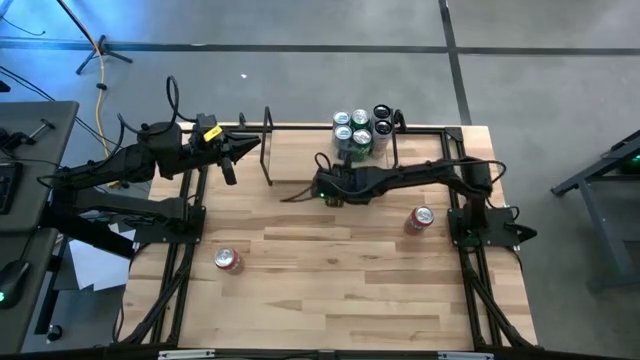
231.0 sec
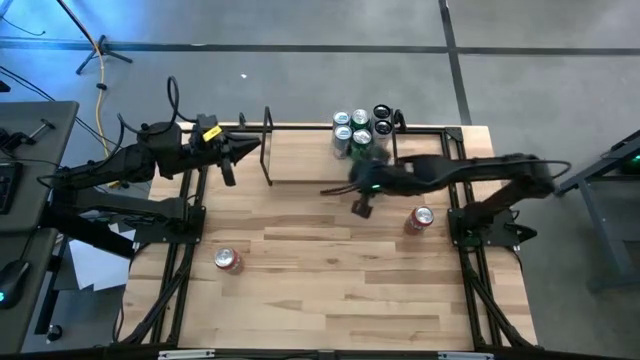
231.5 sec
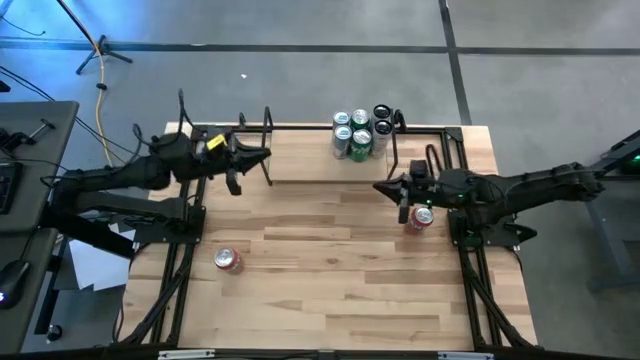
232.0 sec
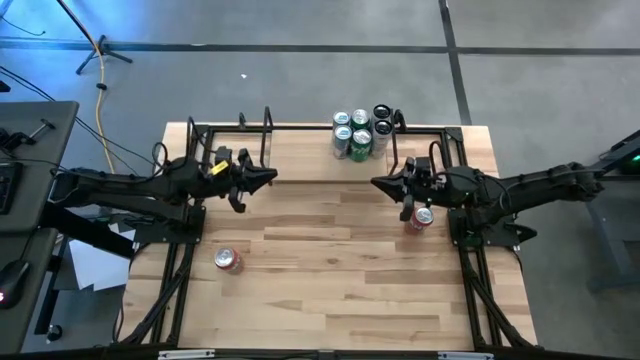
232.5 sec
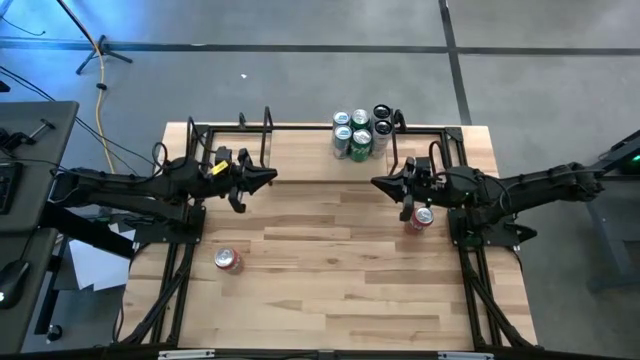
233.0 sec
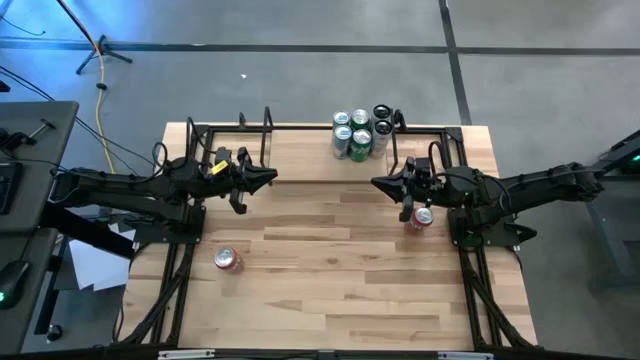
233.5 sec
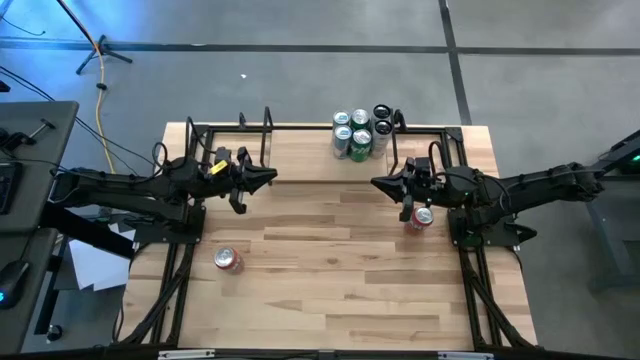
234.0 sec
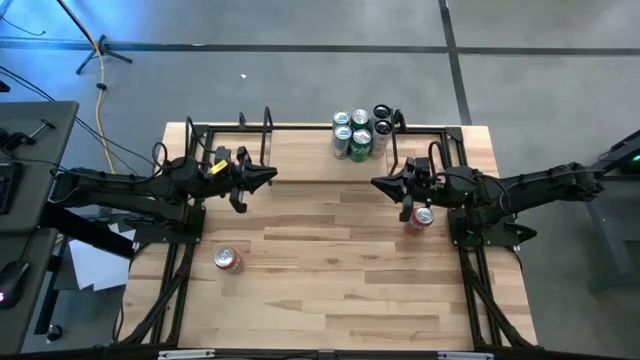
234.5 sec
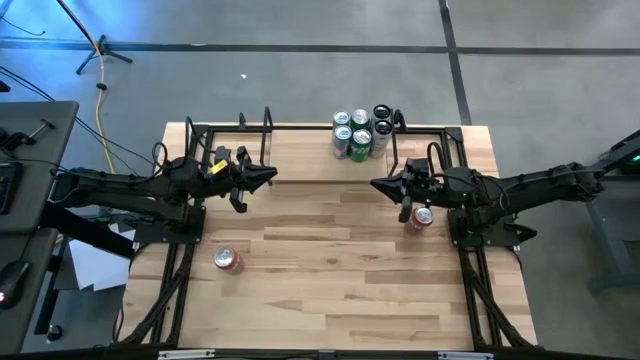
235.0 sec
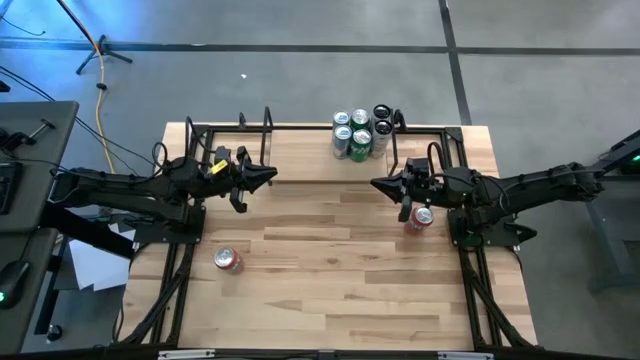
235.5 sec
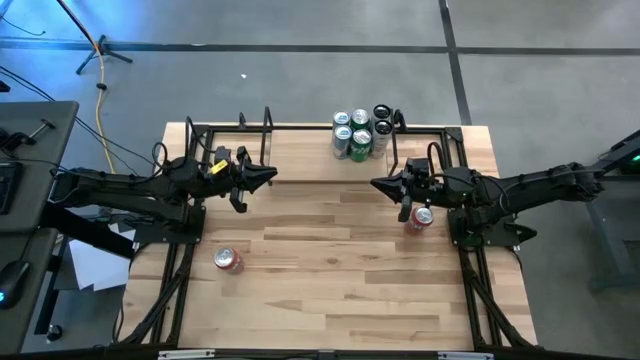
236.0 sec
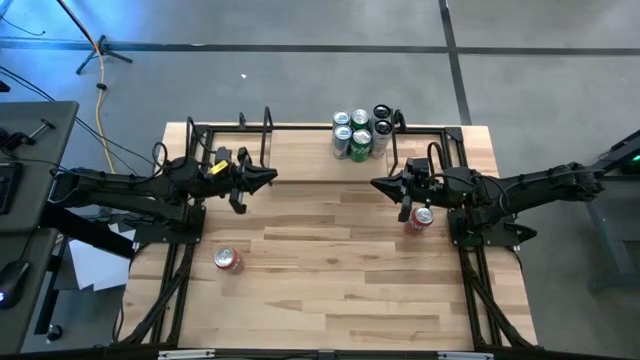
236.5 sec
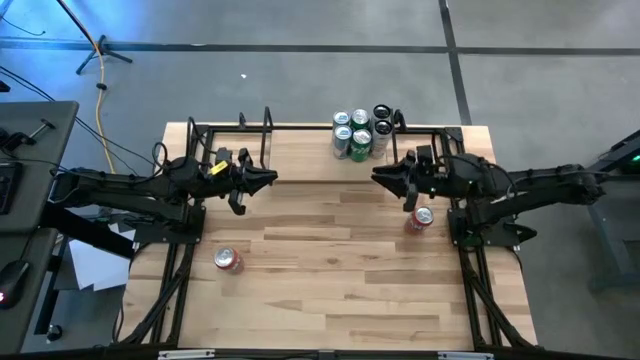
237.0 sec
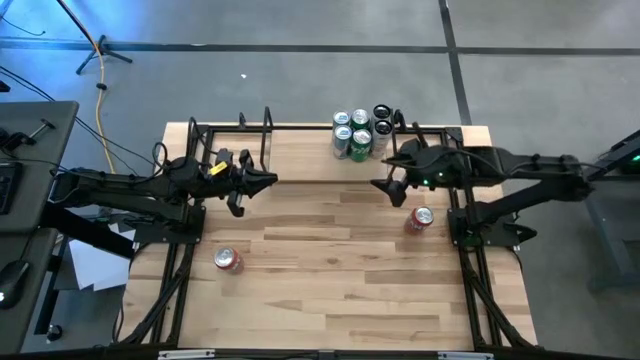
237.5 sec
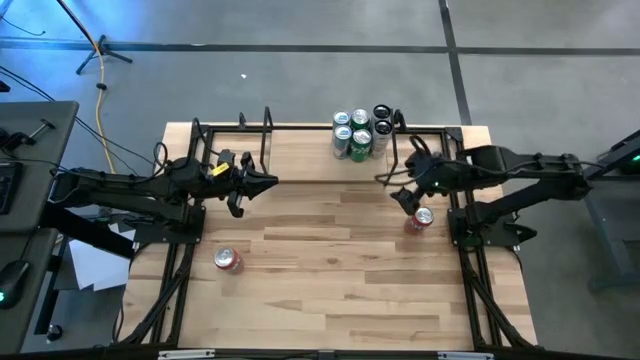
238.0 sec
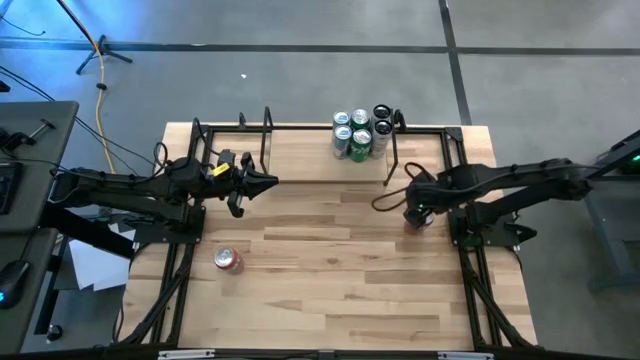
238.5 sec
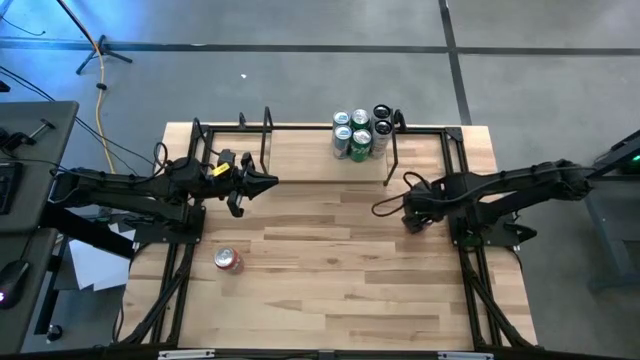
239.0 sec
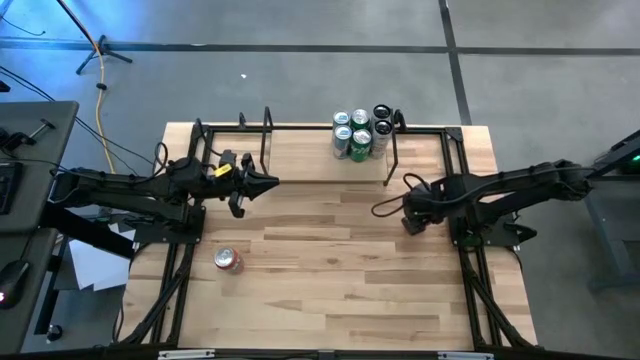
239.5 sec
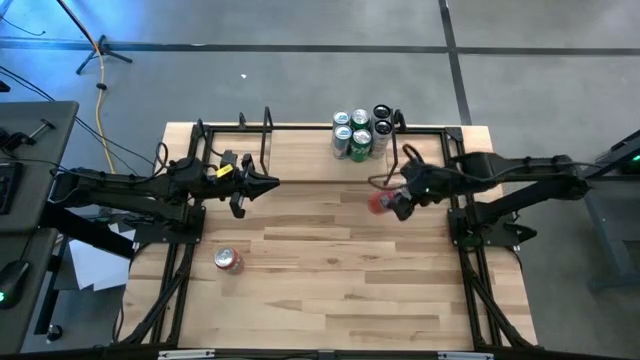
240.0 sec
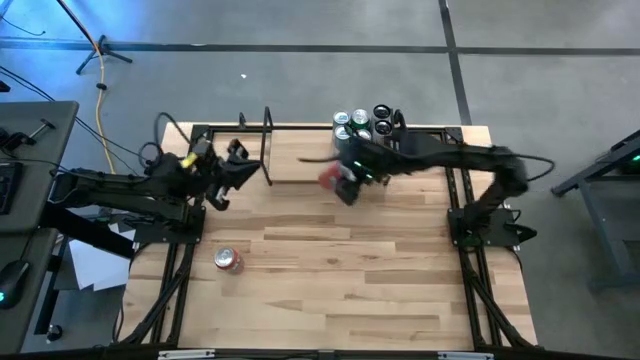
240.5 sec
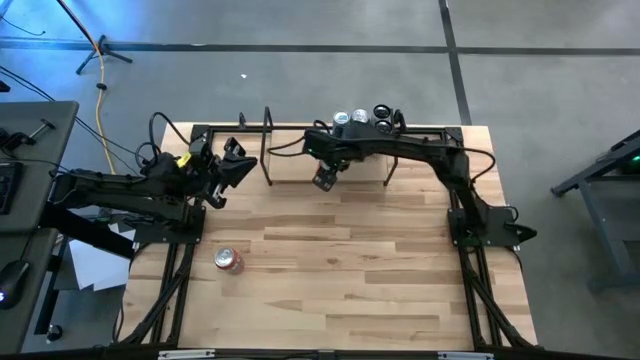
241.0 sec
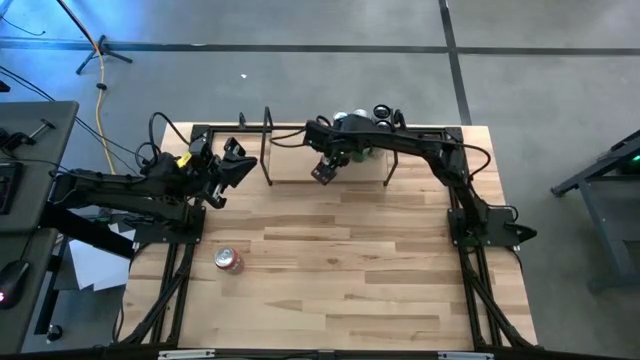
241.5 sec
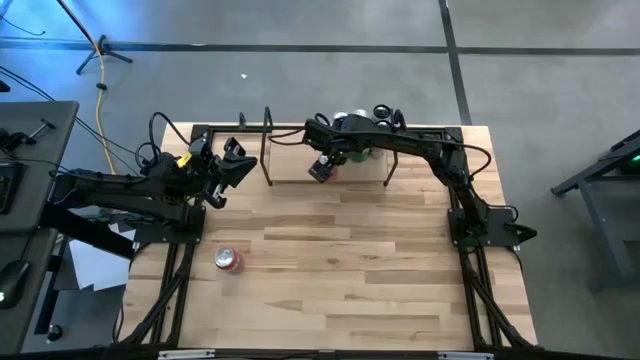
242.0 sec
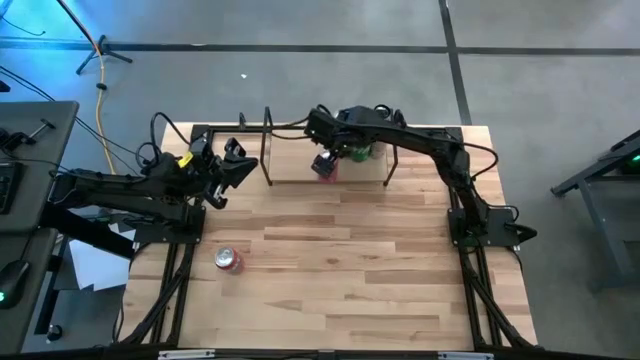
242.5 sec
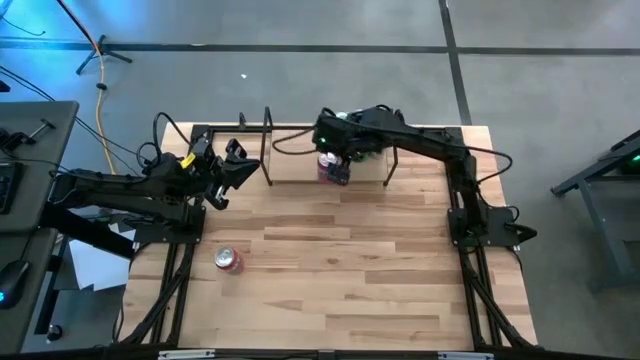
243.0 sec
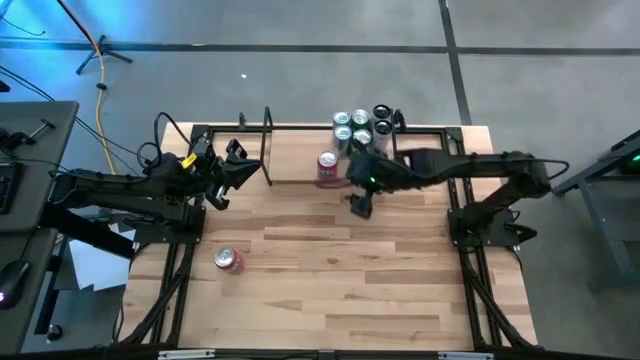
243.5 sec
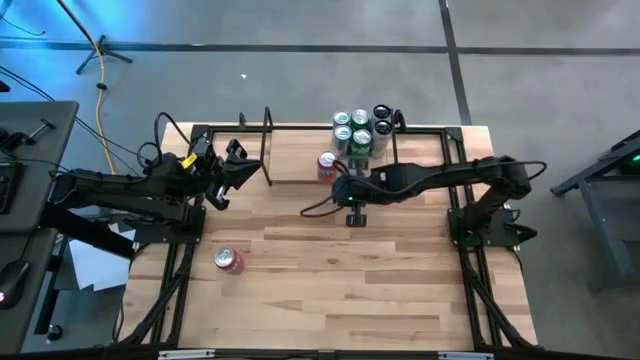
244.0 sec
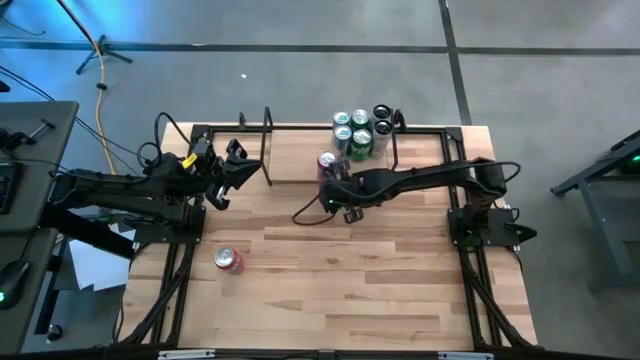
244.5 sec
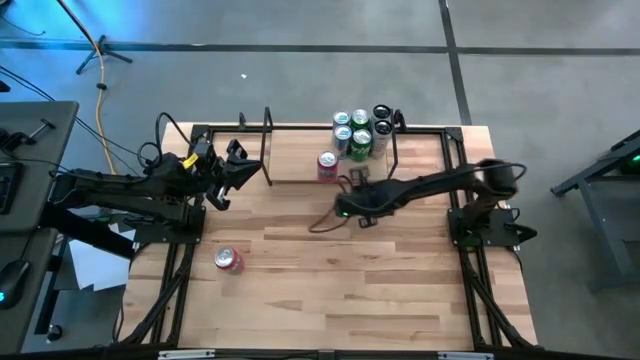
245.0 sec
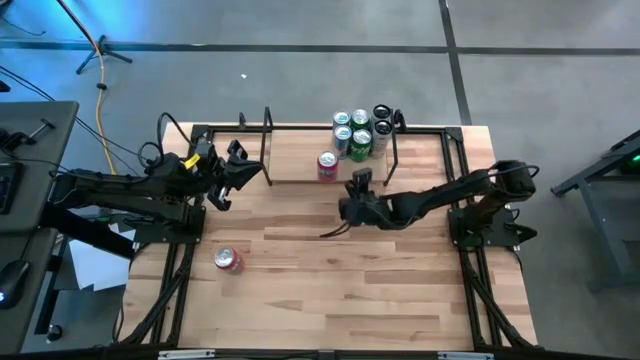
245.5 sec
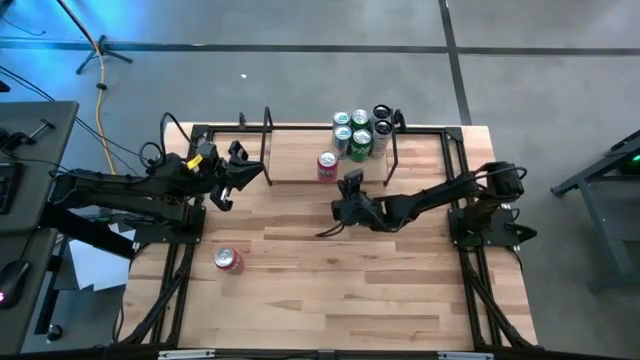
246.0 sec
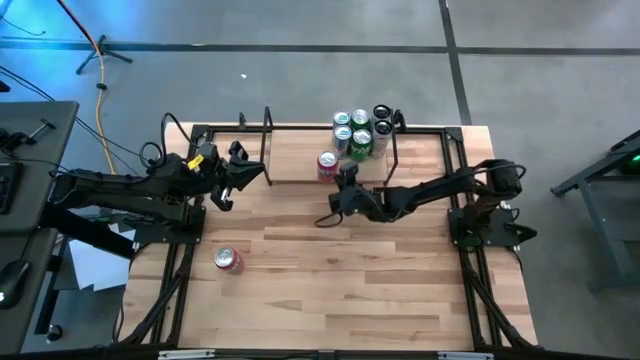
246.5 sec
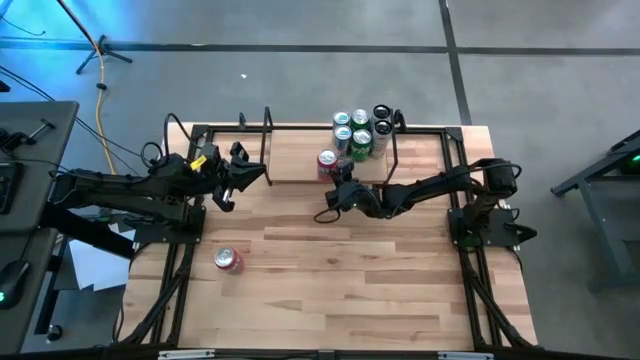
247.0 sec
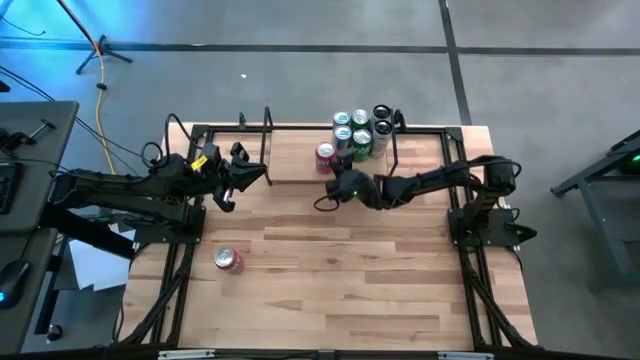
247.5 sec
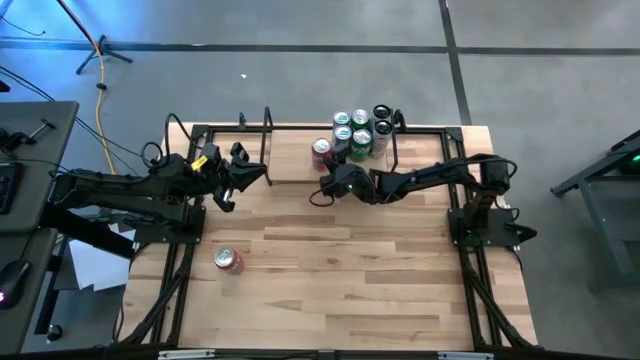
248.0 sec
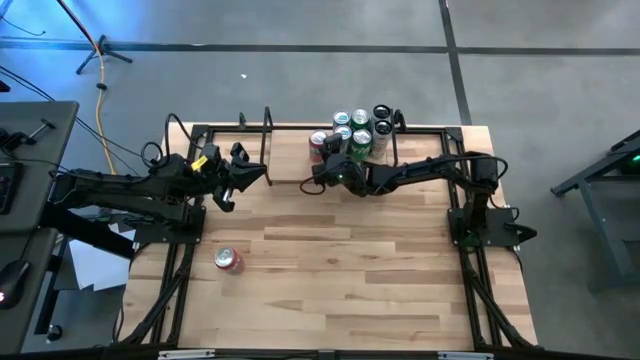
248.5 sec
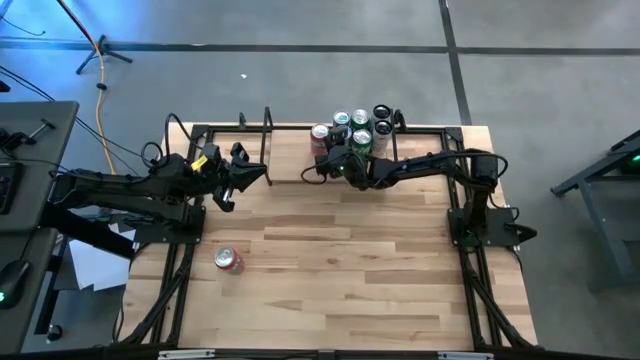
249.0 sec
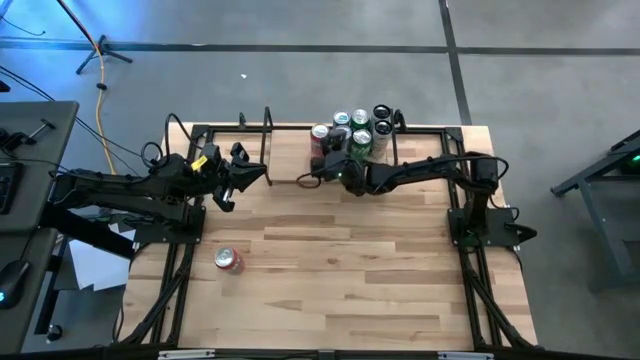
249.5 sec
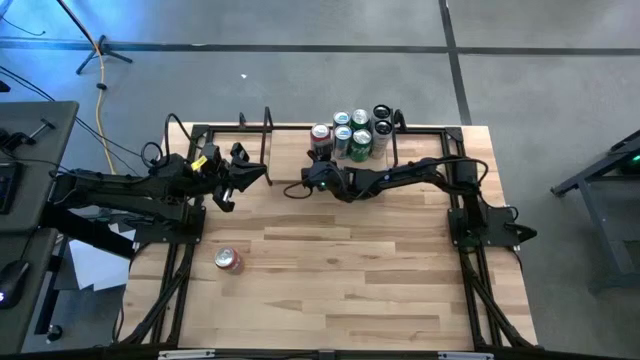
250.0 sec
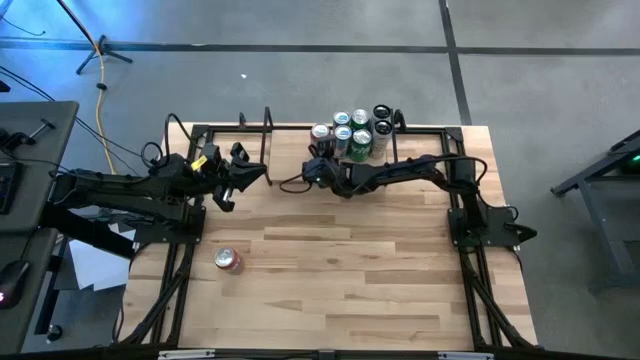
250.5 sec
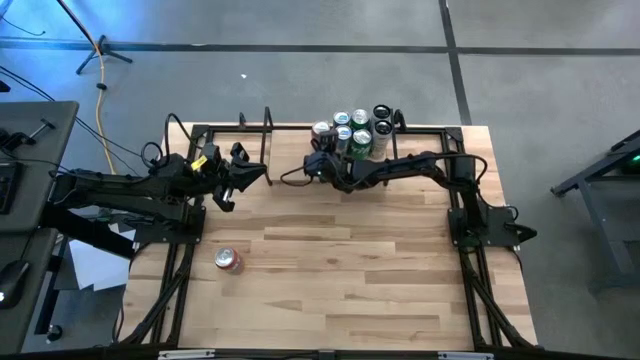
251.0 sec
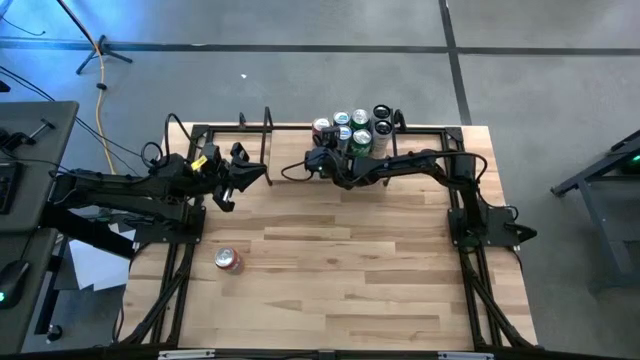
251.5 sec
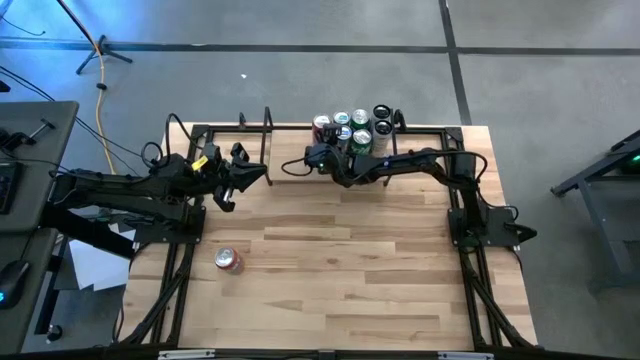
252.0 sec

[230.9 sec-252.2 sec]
Task: Place canned beverage on shelf
Put the right red soda can on the shelf
